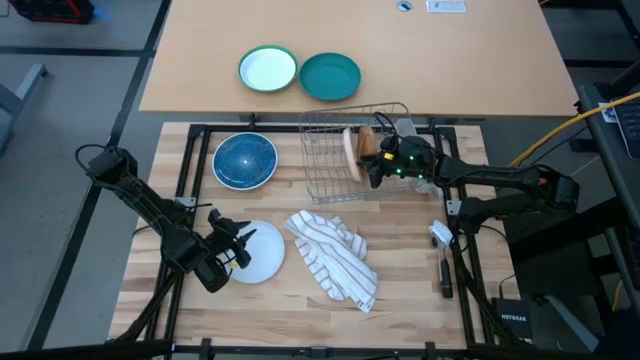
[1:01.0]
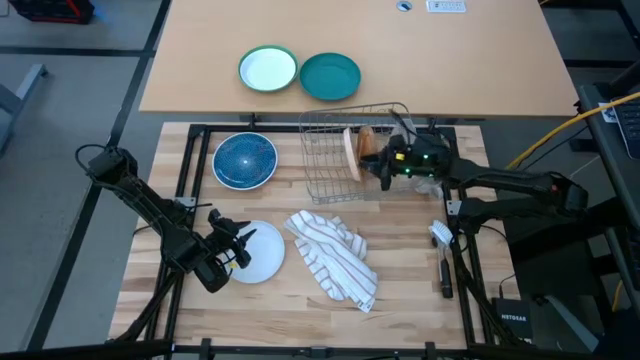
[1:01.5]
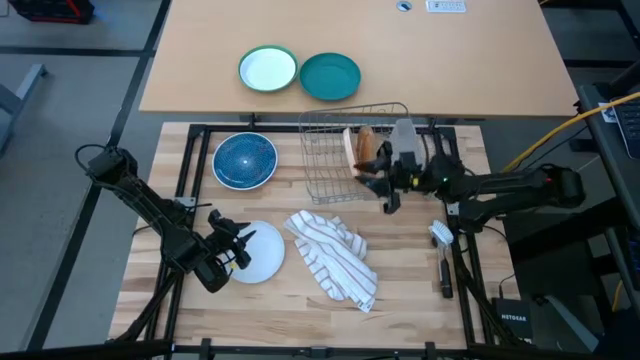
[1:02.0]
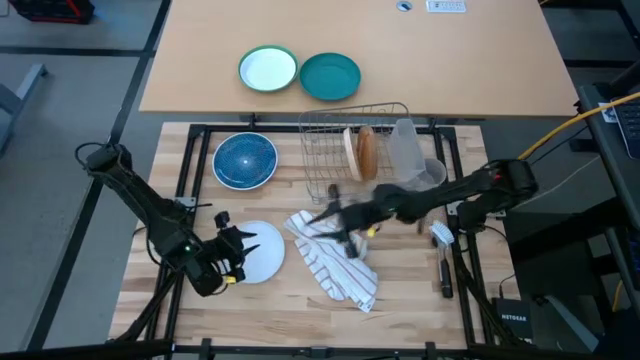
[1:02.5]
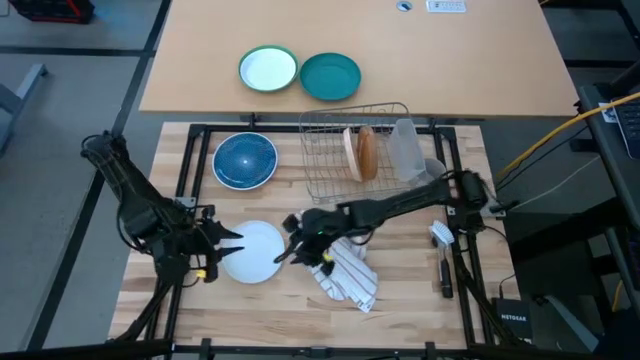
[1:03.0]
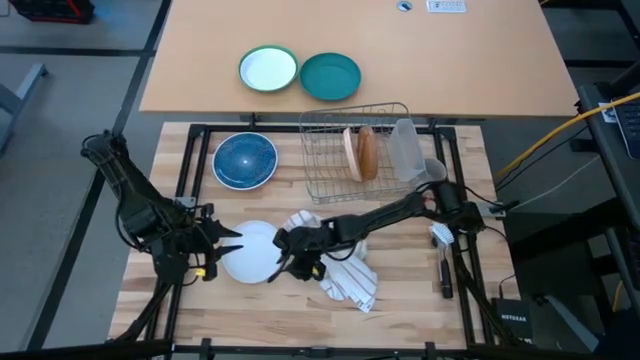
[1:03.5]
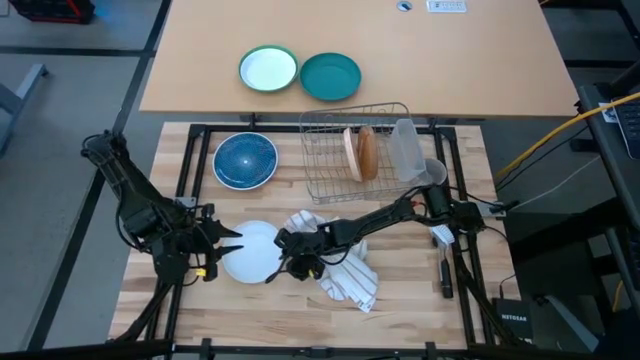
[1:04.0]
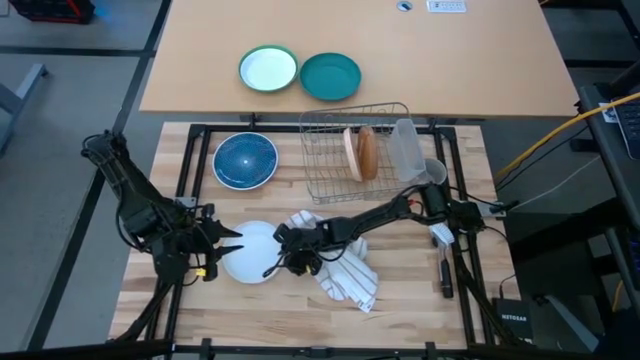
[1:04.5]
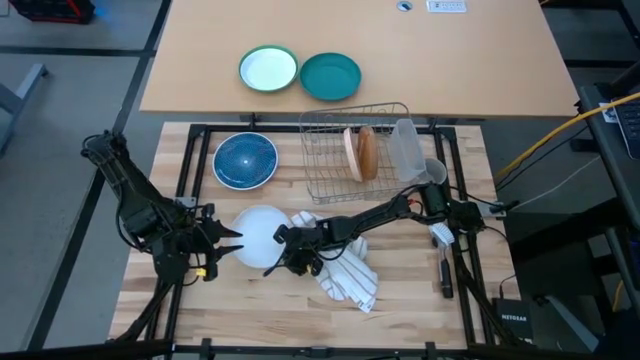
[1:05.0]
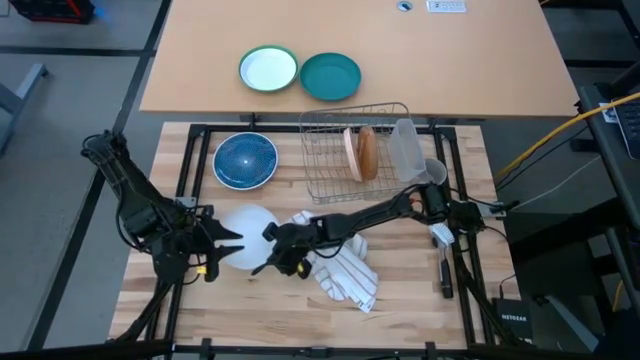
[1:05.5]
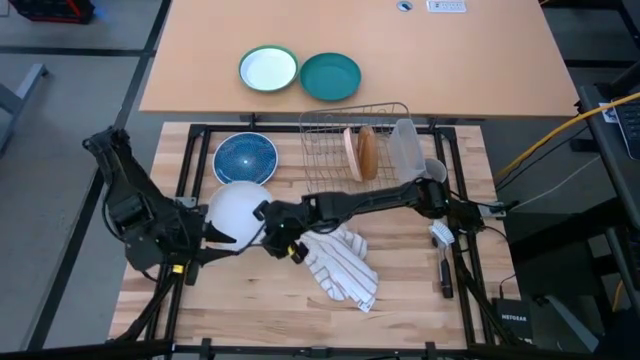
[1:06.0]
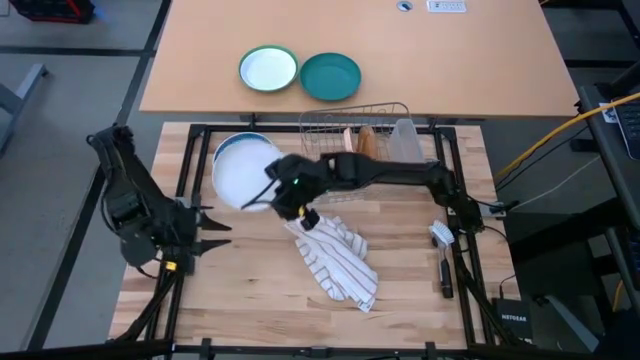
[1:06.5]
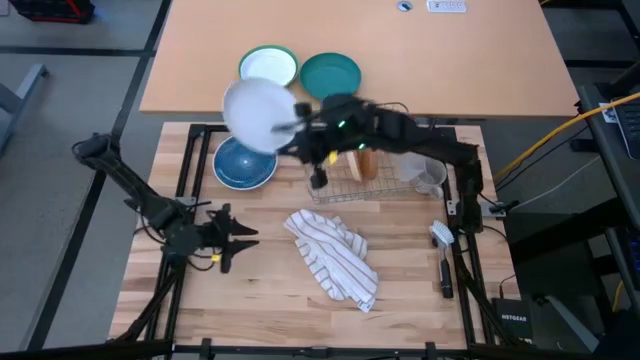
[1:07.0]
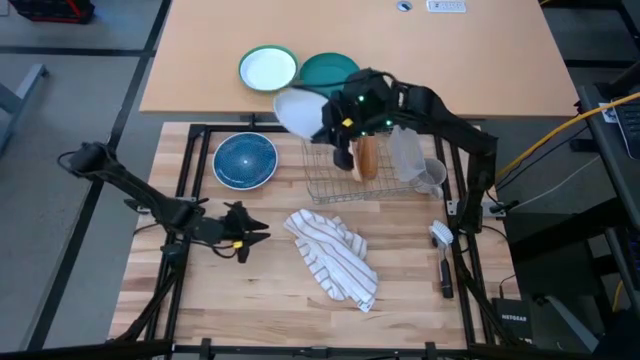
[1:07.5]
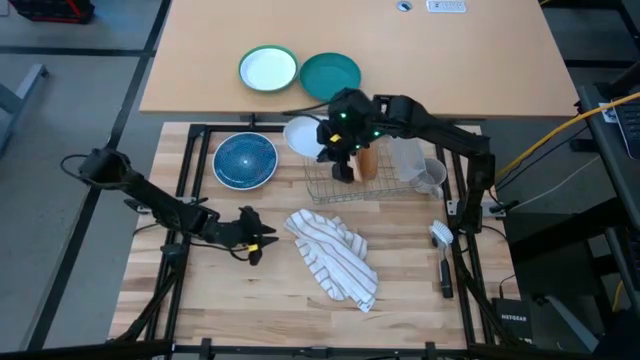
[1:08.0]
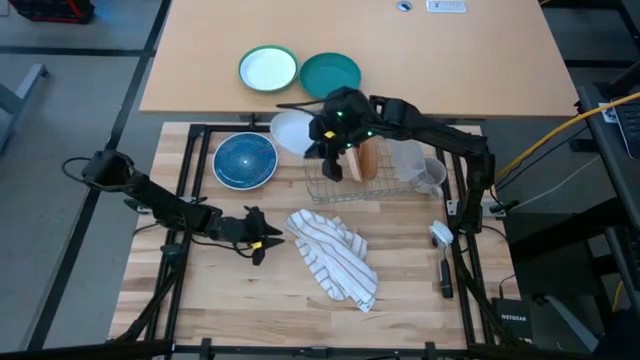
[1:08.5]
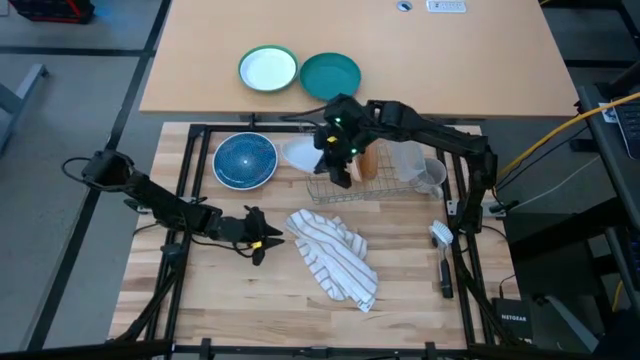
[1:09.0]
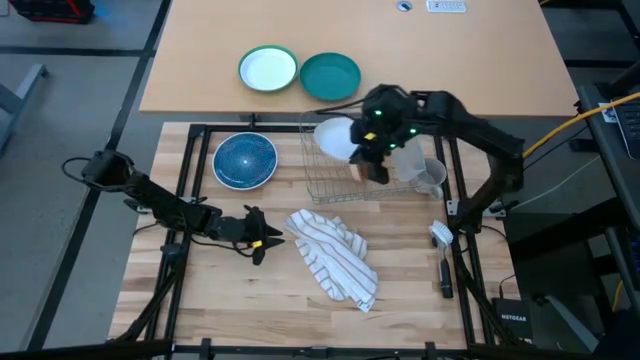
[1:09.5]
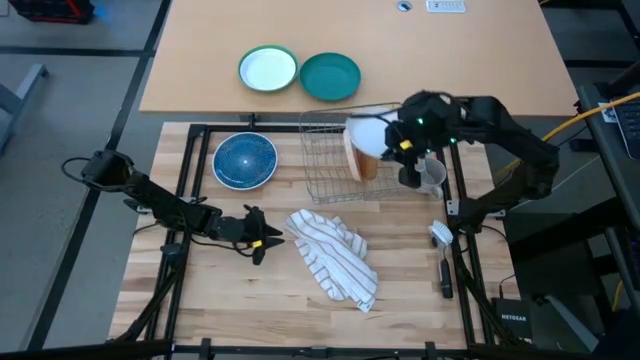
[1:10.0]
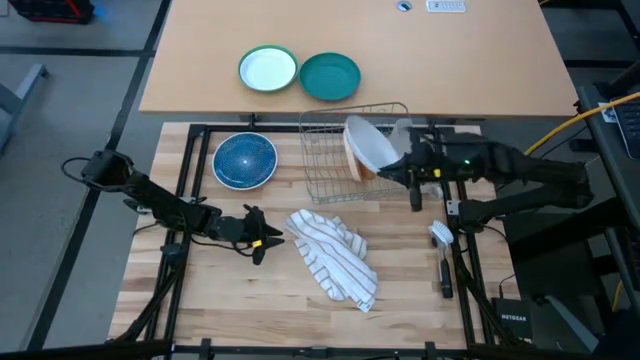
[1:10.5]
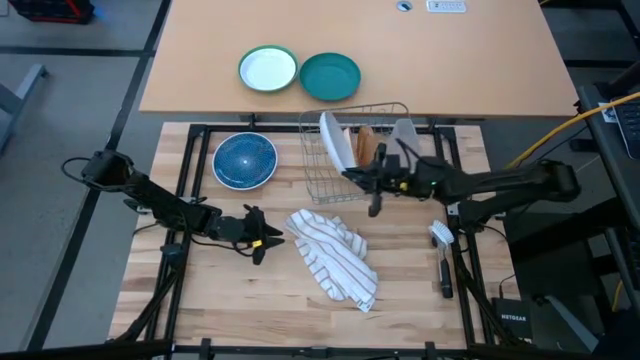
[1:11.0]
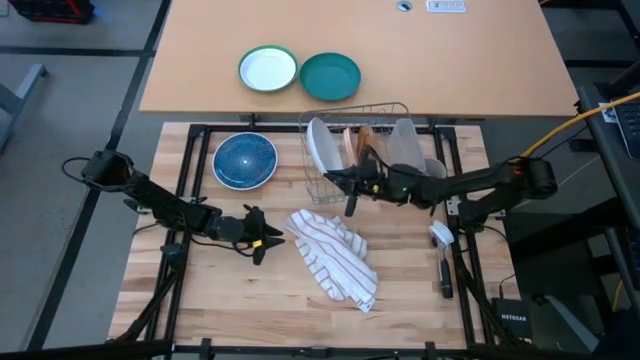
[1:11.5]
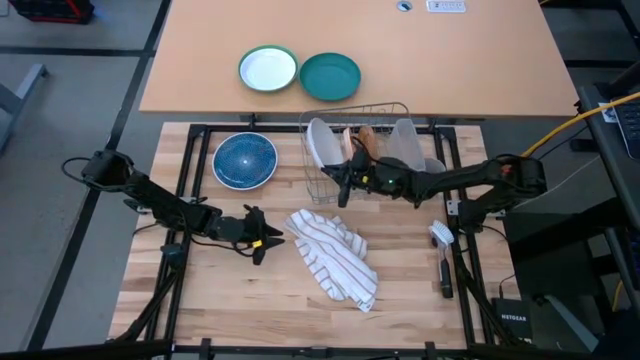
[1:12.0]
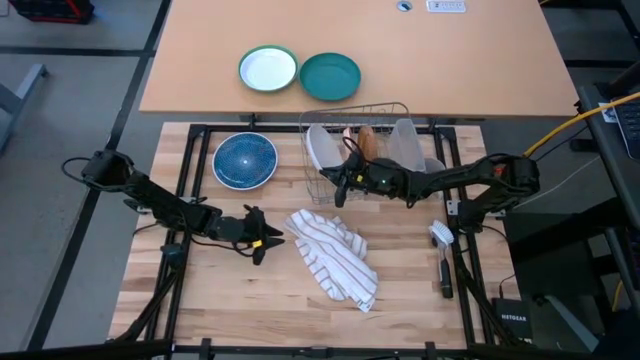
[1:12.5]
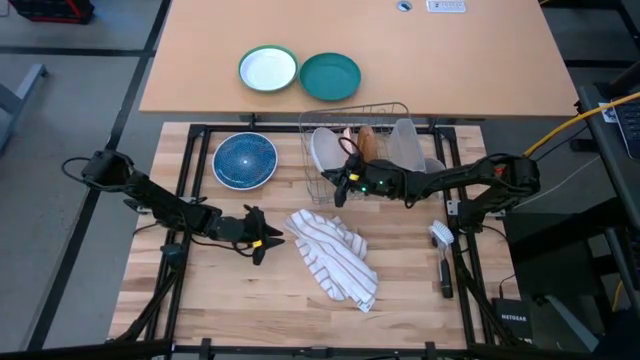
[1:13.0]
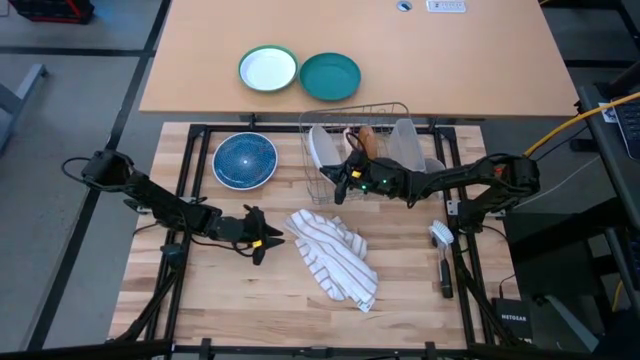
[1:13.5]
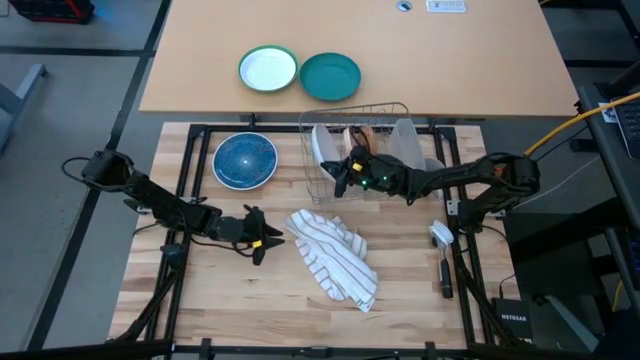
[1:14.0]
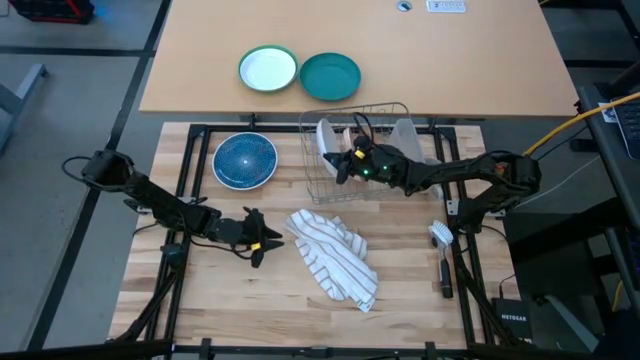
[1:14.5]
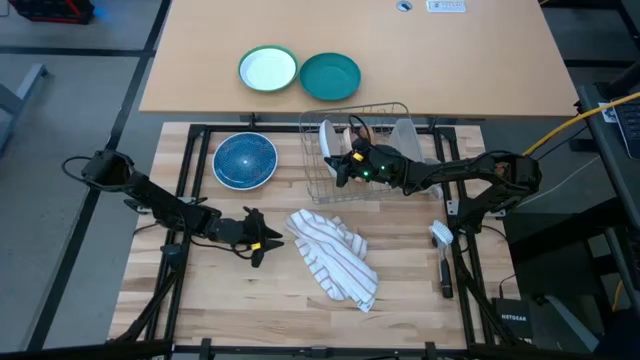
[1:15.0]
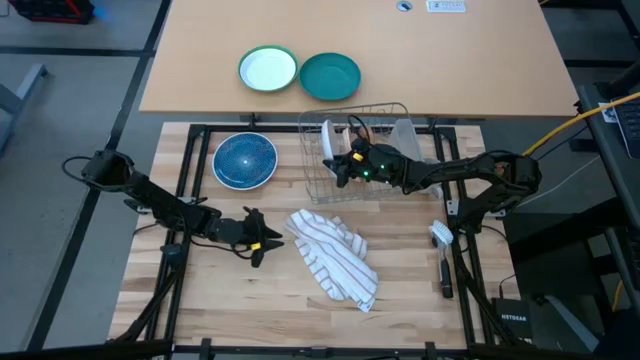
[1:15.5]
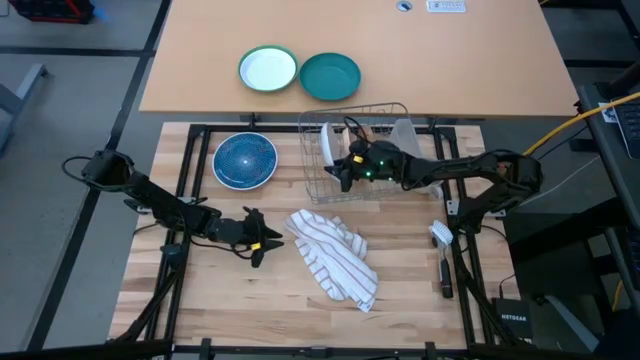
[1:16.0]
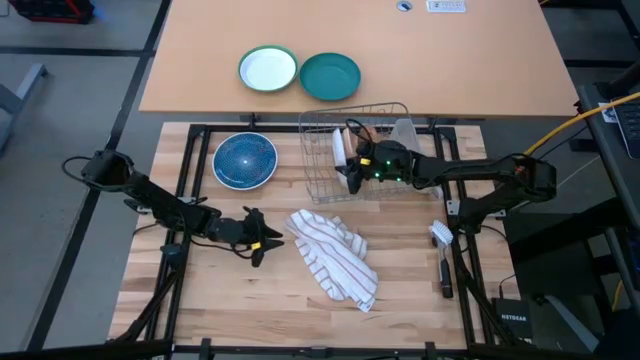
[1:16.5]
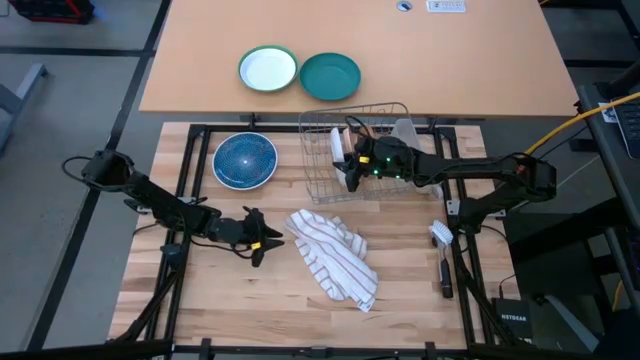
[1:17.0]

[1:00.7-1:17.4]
Task: Sort dishes
Put the white plate into the dish rack
